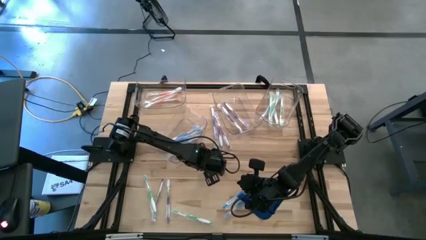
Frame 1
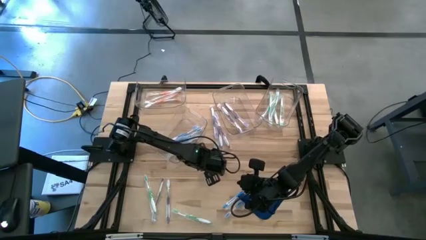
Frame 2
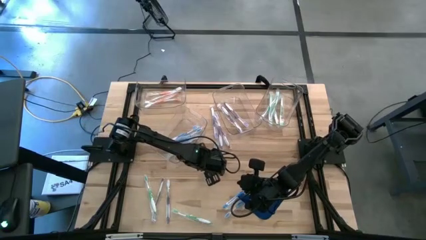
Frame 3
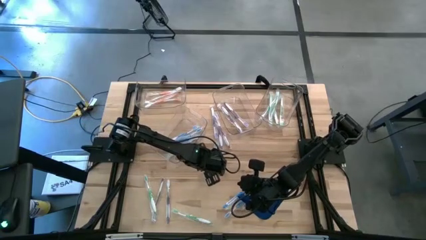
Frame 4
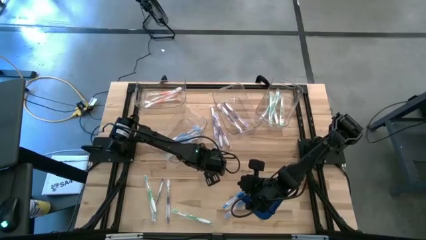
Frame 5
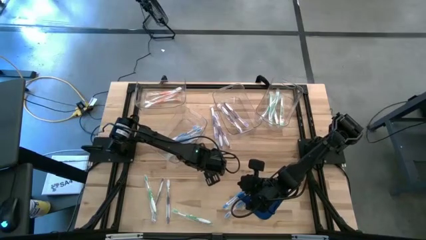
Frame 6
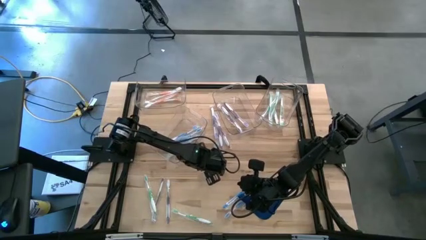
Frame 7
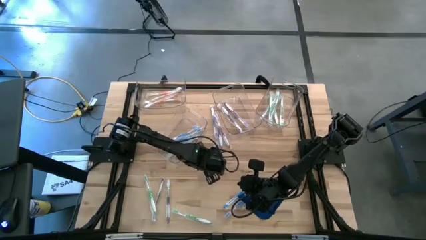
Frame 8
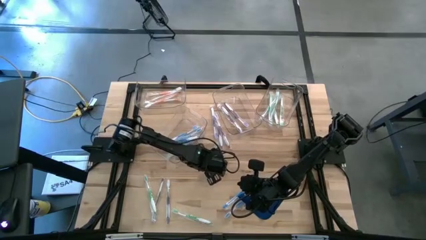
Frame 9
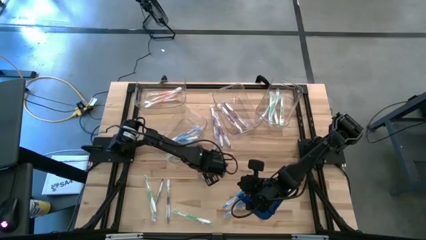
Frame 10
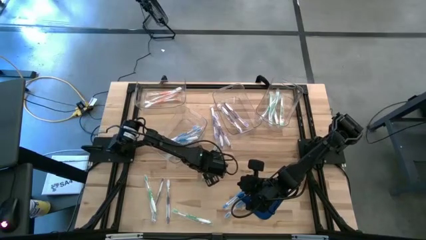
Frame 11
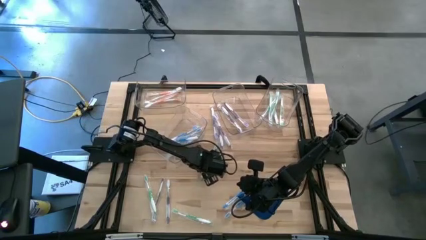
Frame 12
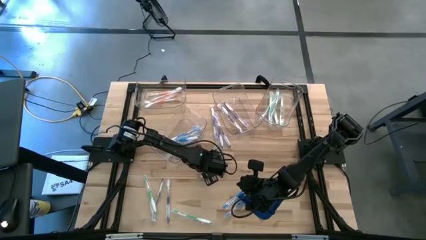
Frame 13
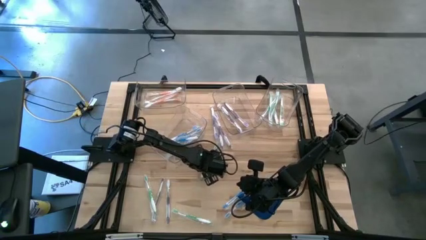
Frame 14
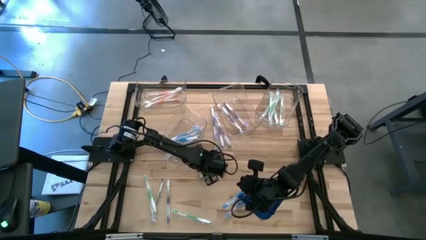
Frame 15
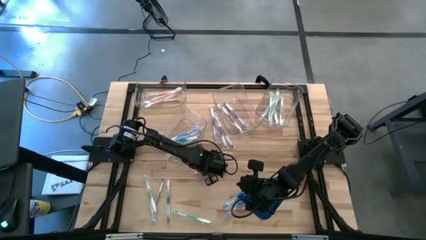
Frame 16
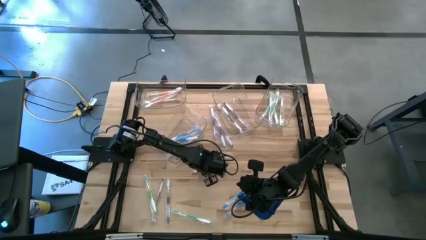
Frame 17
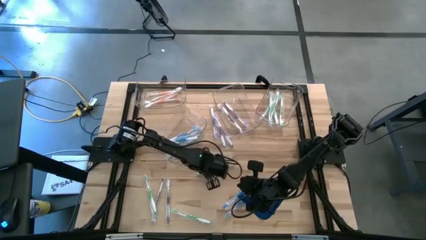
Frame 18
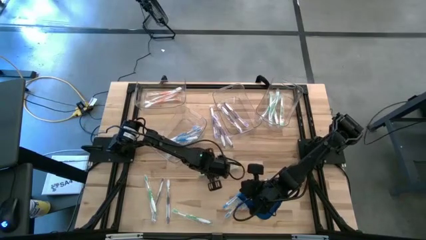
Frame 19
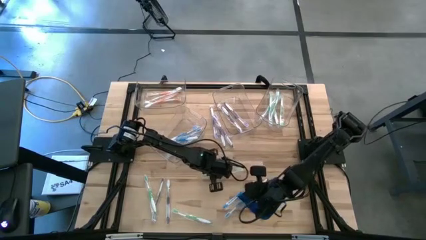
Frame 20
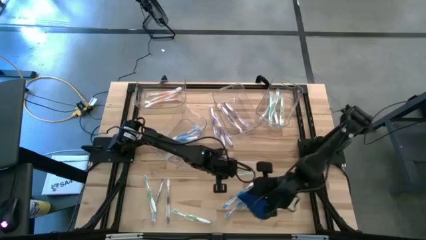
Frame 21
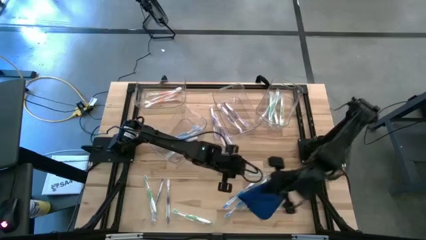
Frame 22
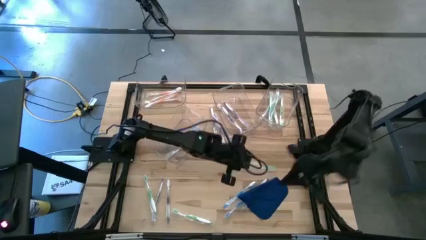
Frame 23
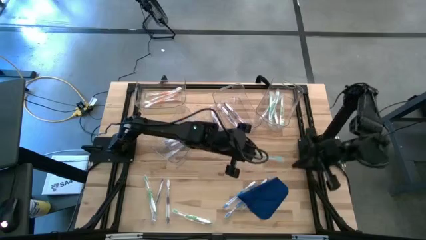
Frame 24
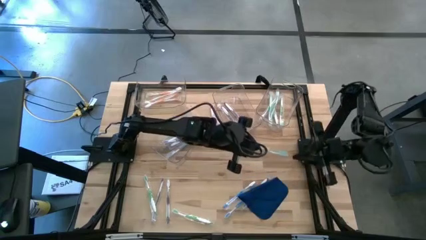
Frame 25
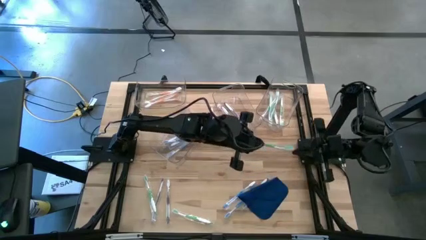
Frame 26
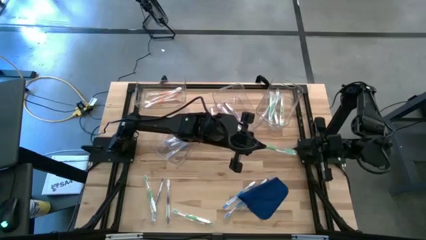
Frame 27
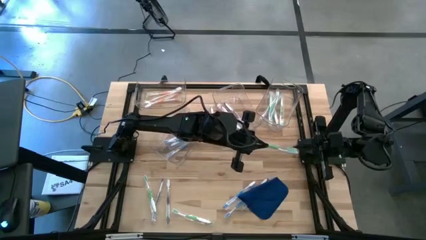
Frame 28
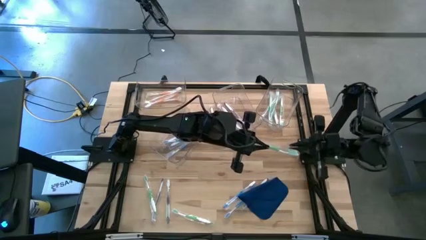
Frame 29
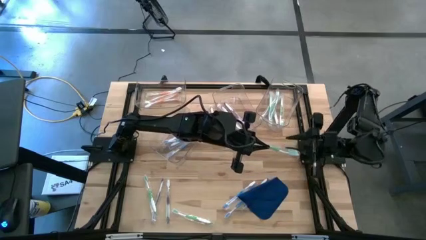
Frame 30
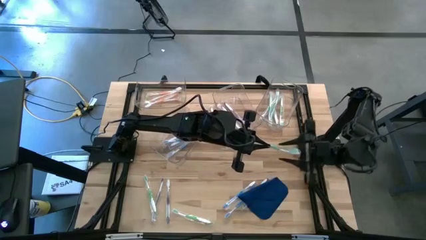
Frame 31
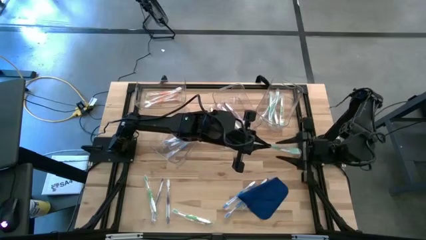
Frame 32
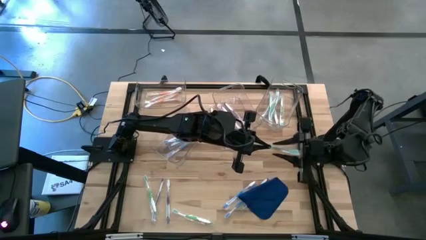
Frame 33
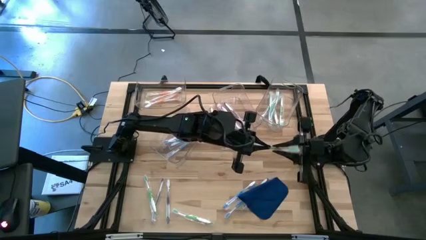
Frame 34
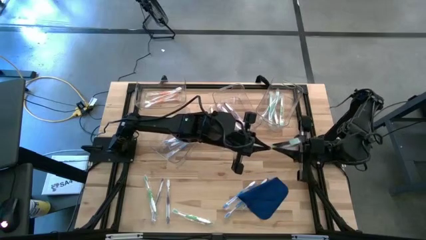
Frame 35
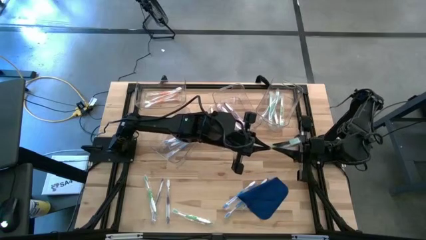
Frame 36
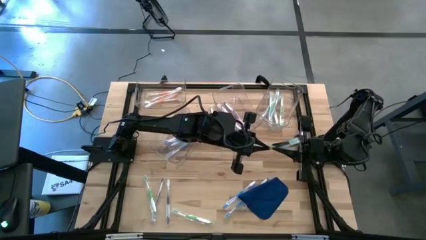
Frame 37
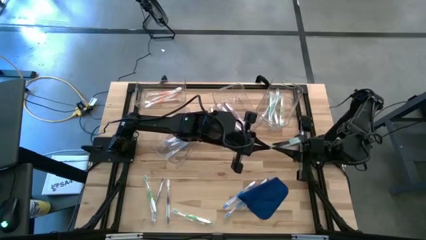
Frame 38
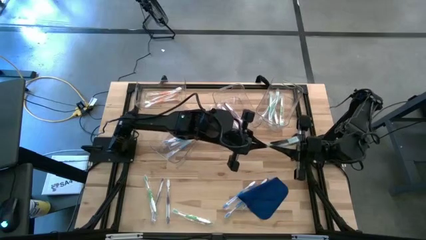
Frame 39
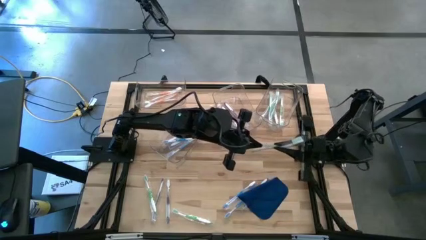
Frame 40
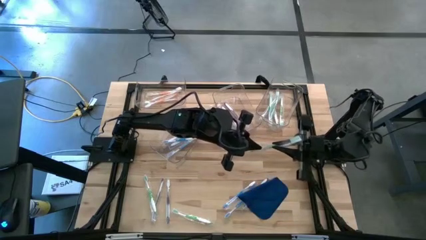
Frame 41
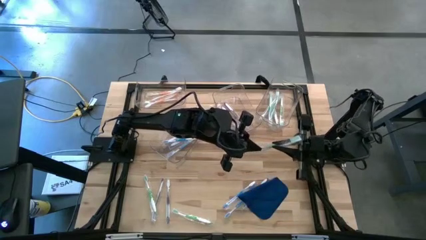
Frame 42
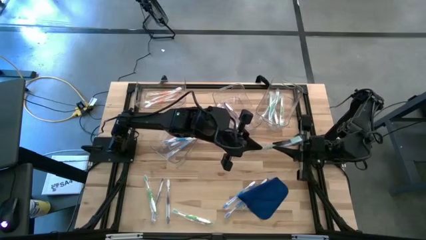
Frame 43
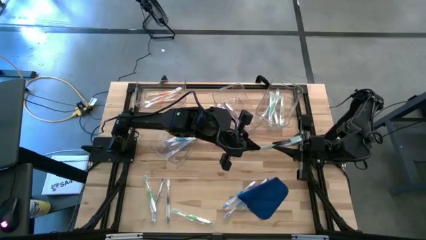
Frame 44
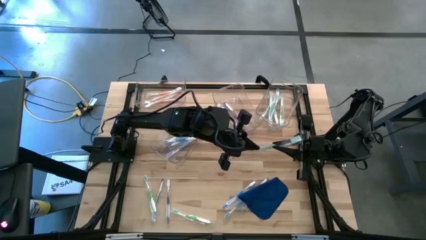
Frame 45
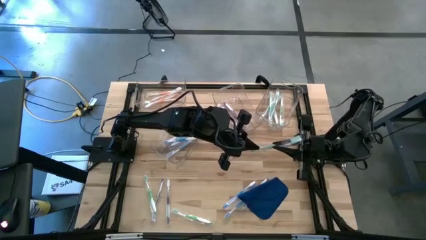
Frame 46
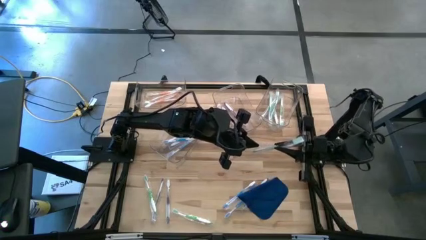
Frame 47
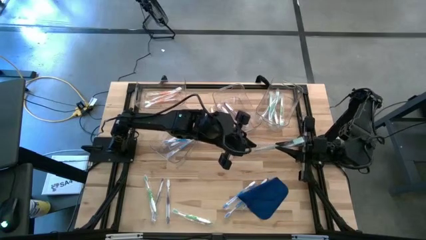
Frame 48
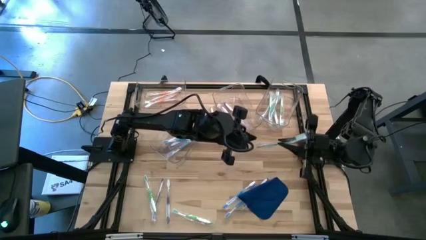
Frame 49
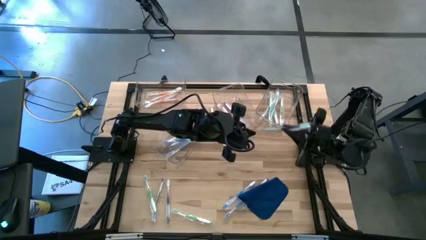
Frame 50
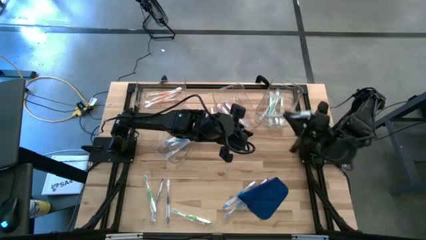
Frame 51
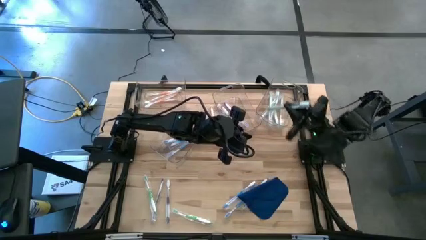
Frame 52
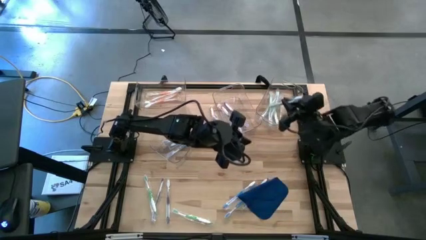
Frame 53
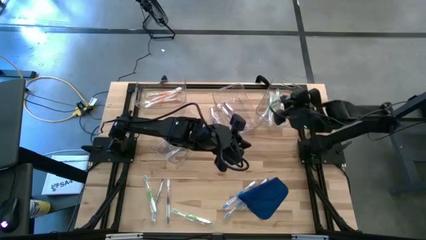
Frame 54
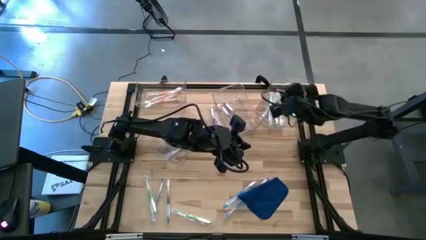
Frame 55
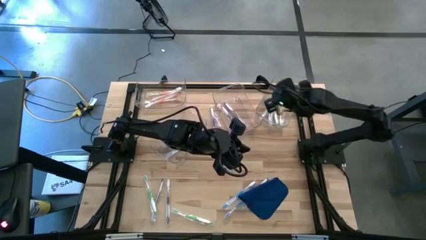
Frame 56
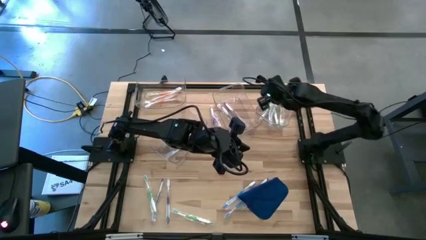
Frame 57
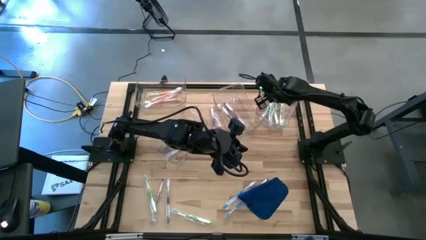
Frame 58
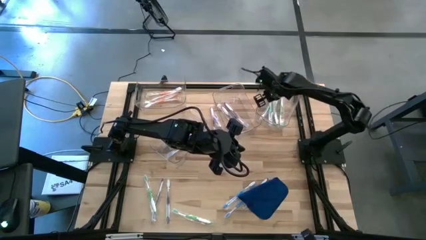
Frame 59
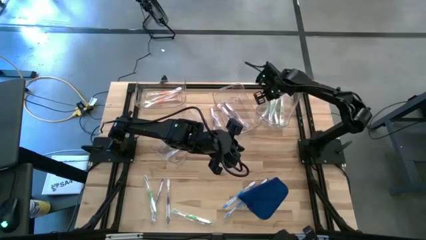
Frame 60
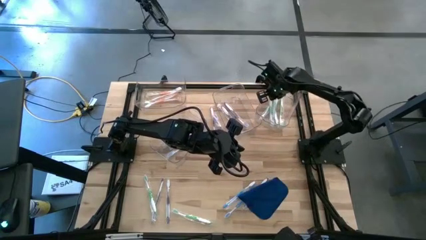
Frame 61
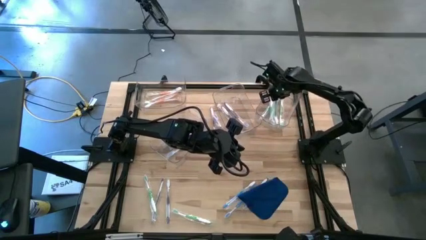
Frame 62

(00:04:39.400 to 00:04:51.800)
Task: Pick & Place Toothbrushes
Put the green toothbrush into the top right transparent bin
